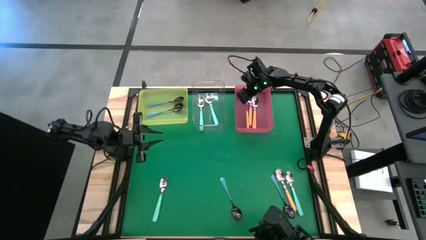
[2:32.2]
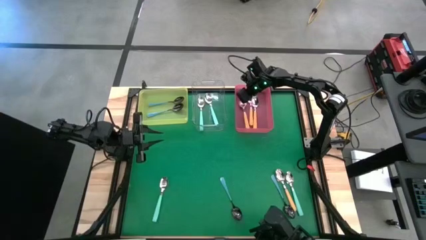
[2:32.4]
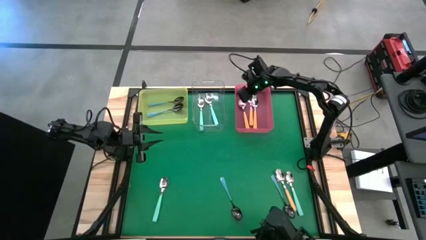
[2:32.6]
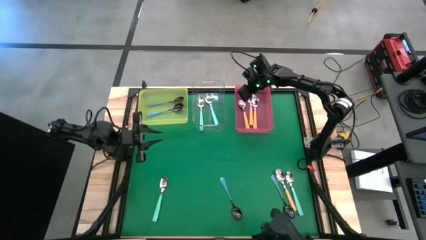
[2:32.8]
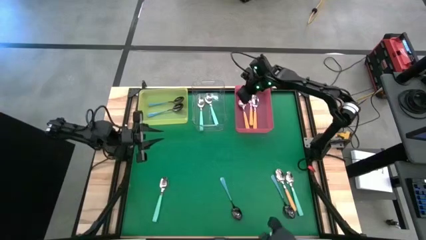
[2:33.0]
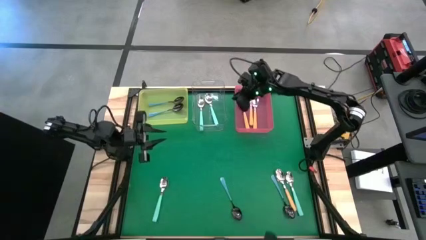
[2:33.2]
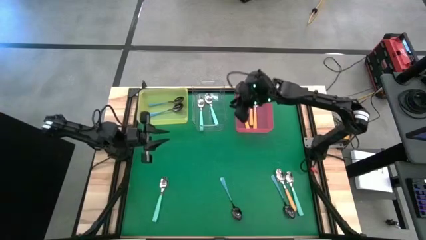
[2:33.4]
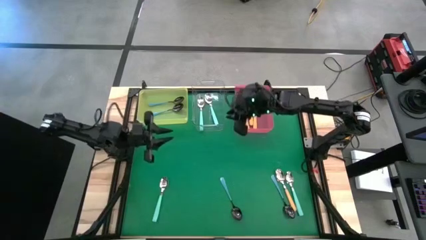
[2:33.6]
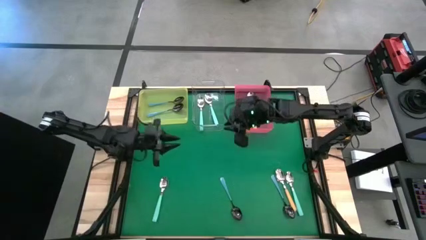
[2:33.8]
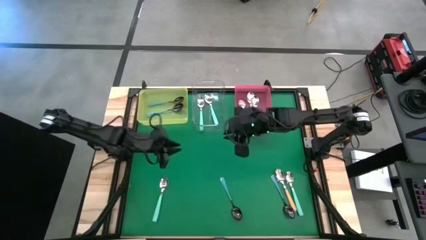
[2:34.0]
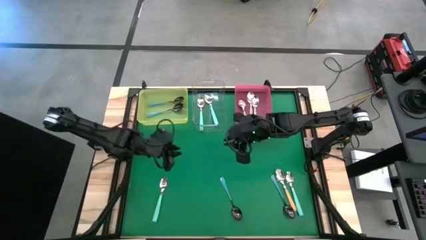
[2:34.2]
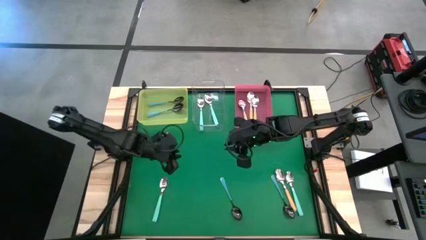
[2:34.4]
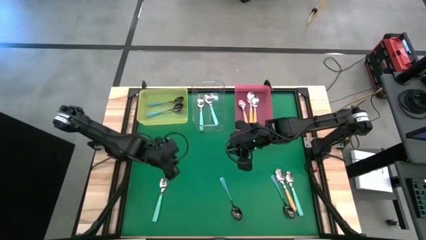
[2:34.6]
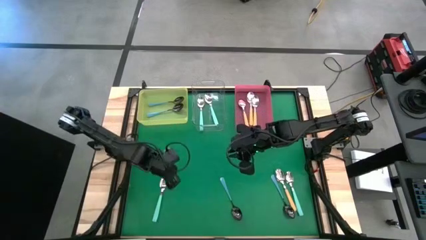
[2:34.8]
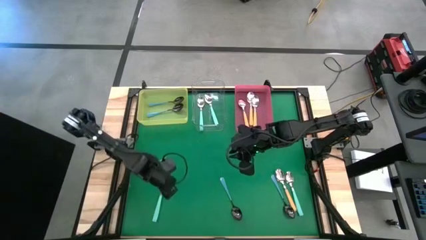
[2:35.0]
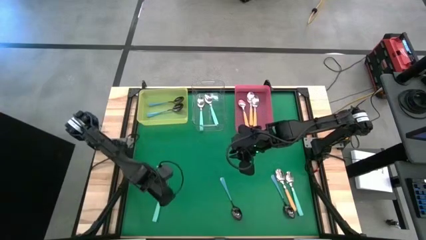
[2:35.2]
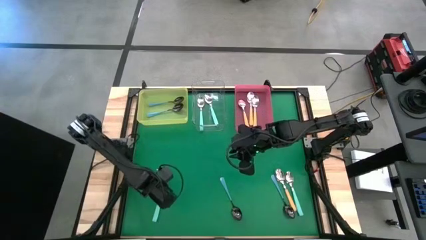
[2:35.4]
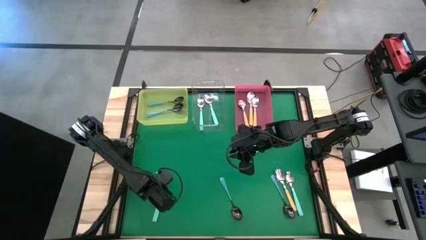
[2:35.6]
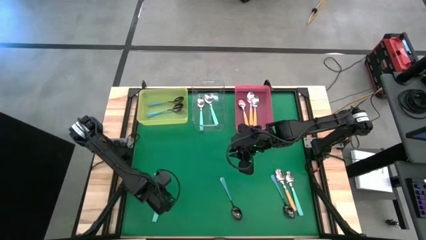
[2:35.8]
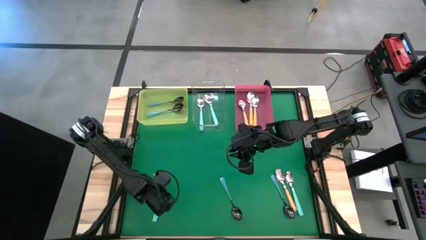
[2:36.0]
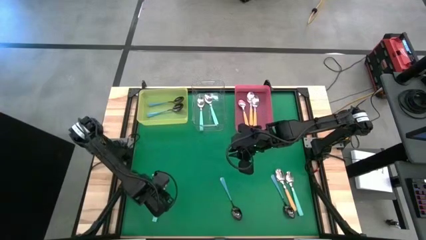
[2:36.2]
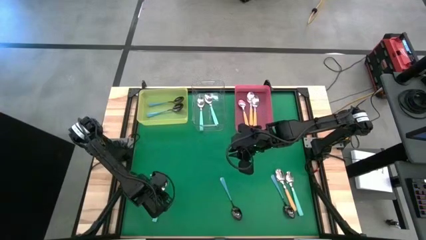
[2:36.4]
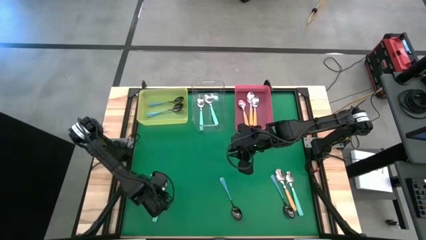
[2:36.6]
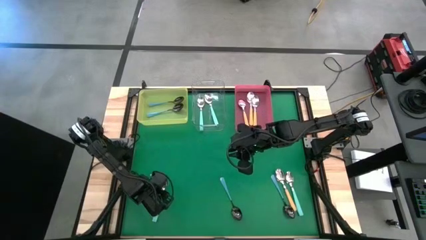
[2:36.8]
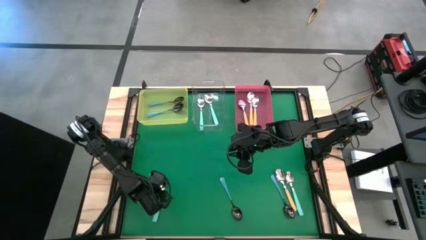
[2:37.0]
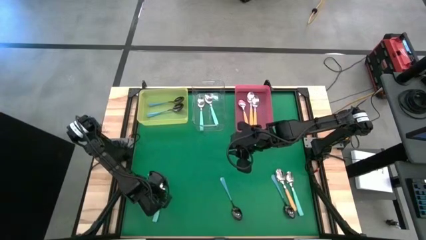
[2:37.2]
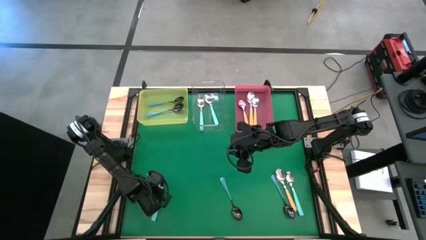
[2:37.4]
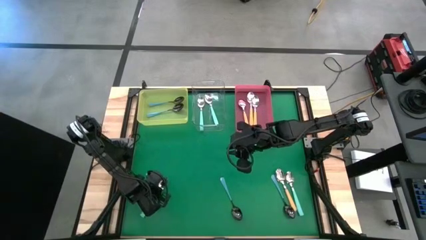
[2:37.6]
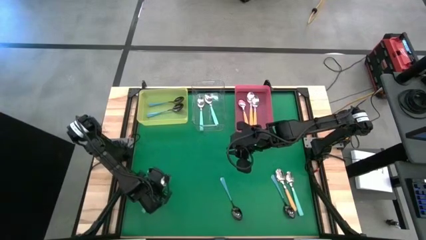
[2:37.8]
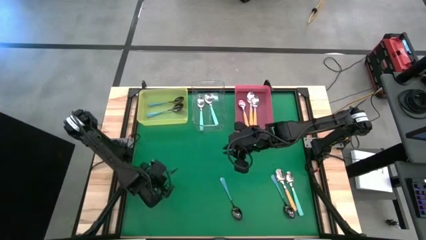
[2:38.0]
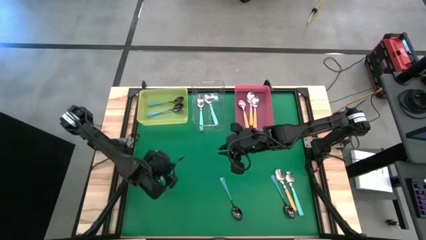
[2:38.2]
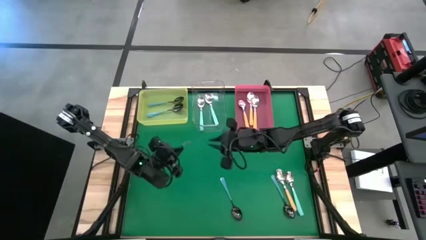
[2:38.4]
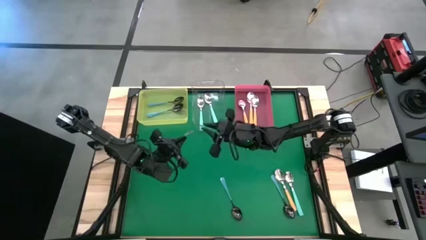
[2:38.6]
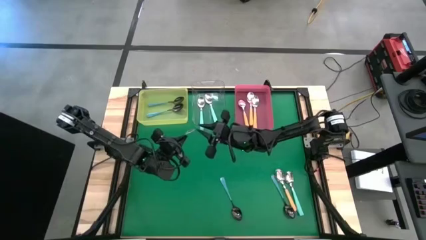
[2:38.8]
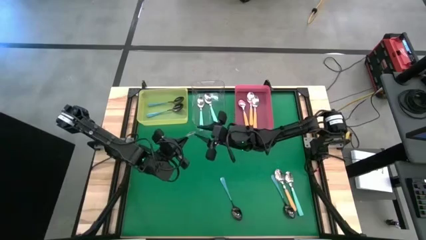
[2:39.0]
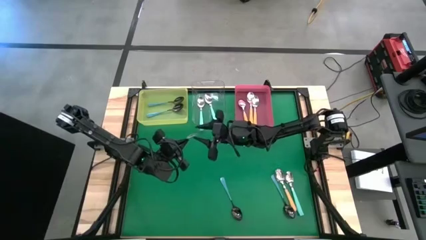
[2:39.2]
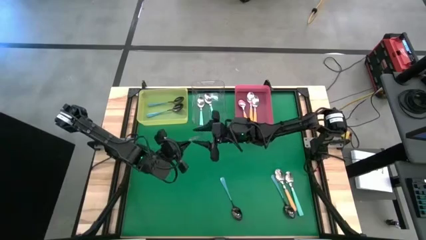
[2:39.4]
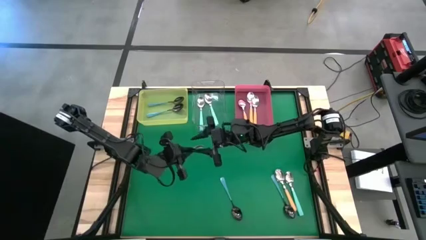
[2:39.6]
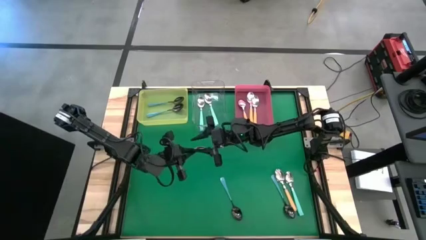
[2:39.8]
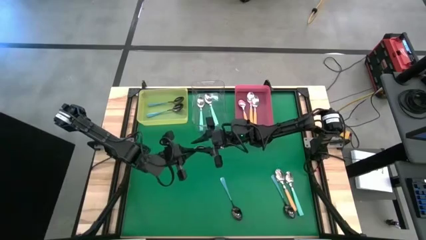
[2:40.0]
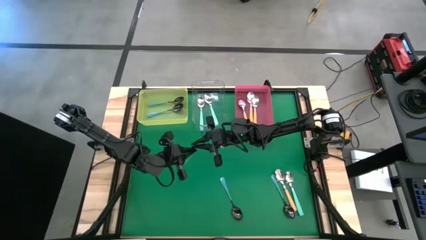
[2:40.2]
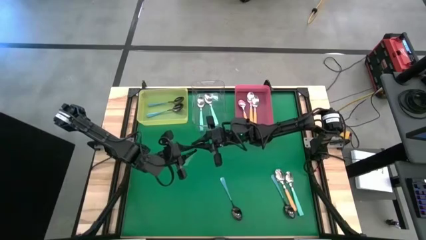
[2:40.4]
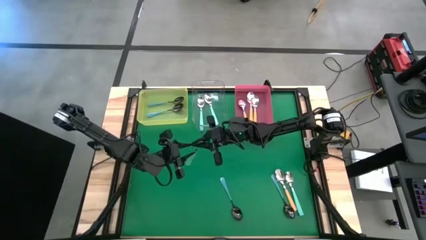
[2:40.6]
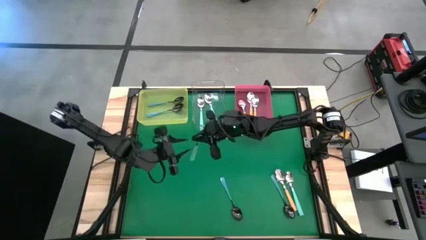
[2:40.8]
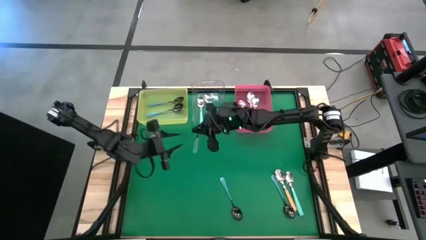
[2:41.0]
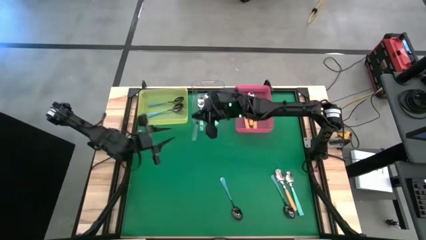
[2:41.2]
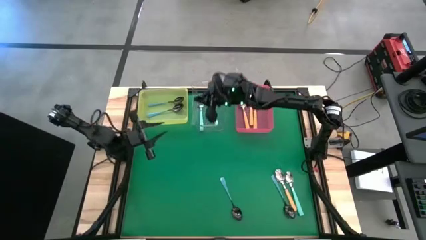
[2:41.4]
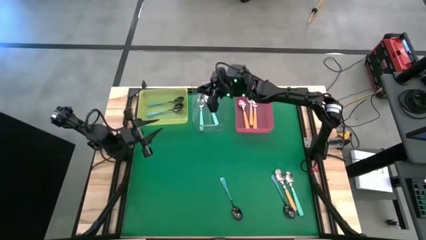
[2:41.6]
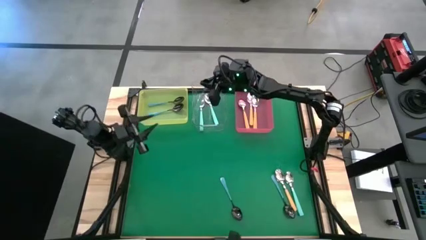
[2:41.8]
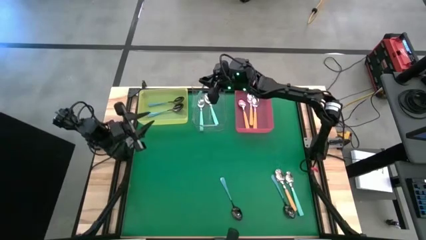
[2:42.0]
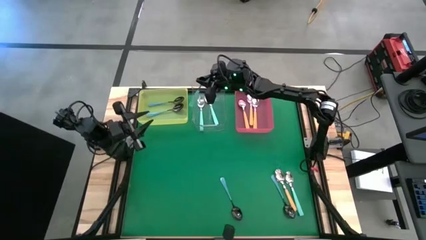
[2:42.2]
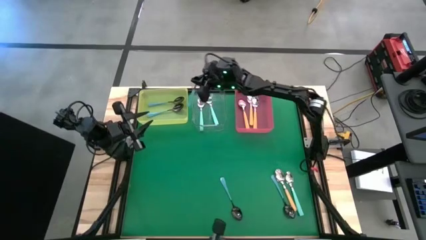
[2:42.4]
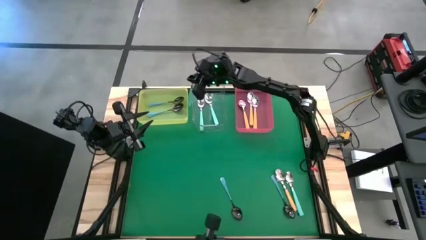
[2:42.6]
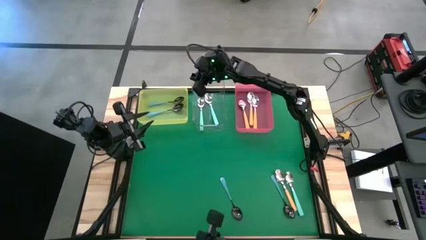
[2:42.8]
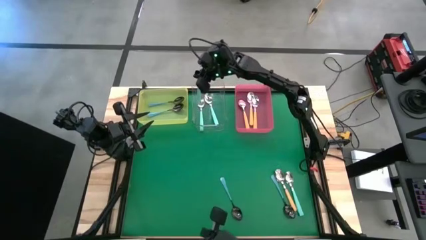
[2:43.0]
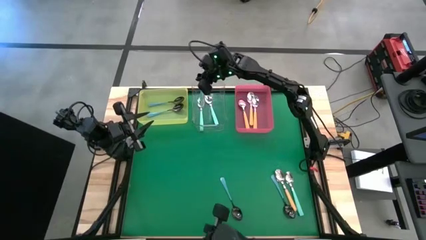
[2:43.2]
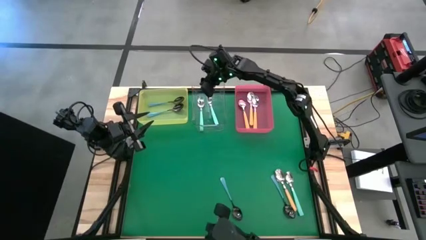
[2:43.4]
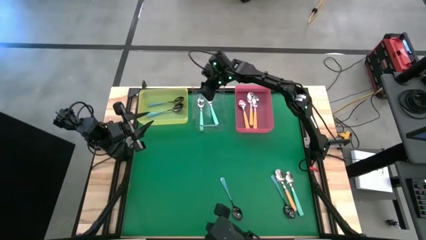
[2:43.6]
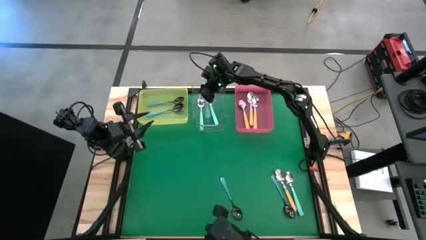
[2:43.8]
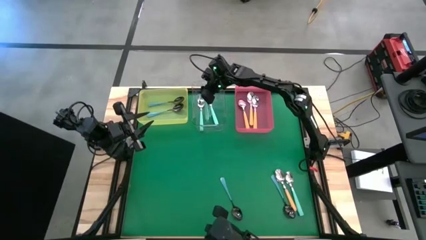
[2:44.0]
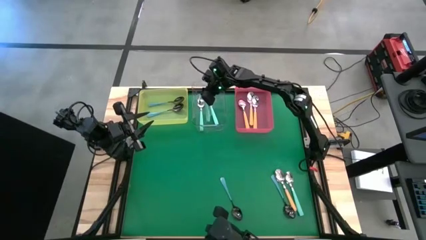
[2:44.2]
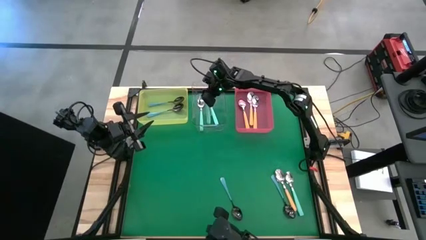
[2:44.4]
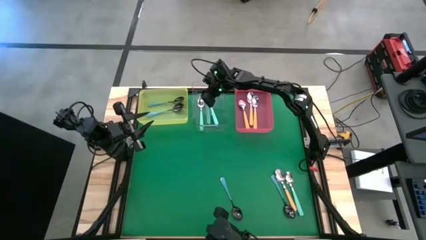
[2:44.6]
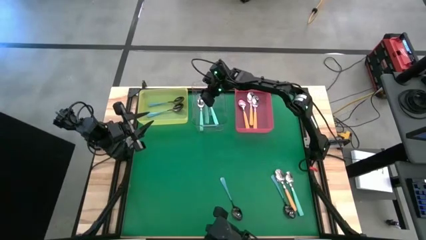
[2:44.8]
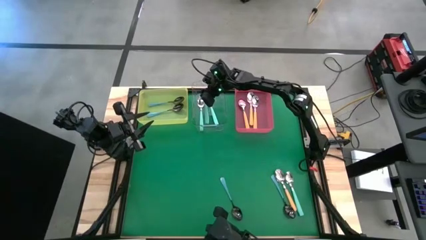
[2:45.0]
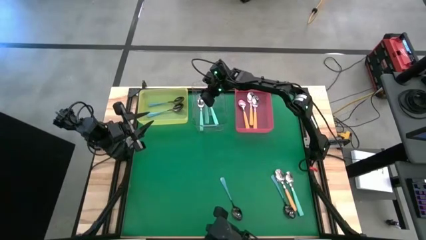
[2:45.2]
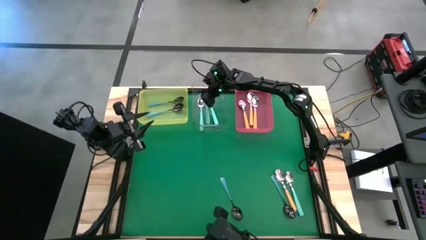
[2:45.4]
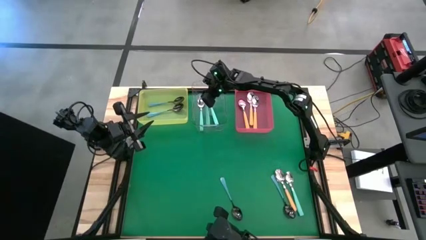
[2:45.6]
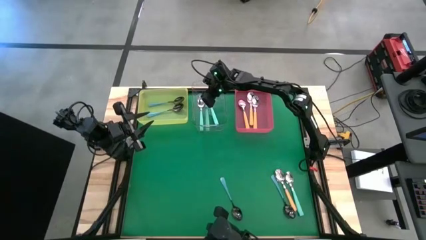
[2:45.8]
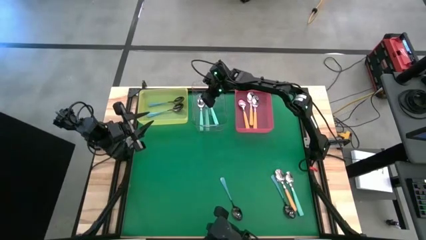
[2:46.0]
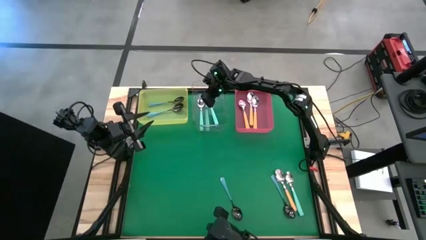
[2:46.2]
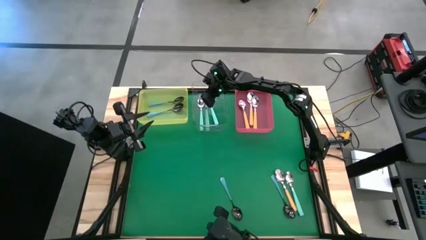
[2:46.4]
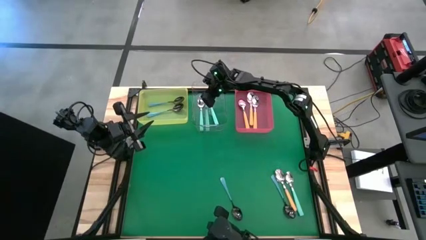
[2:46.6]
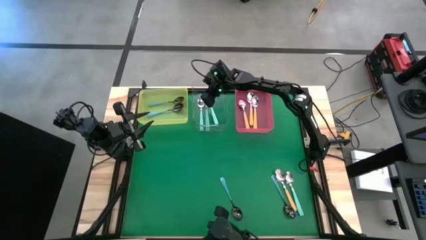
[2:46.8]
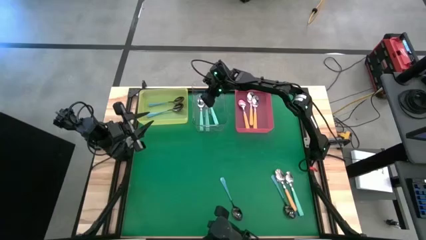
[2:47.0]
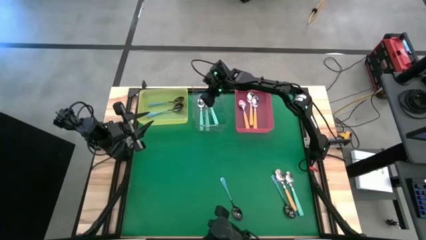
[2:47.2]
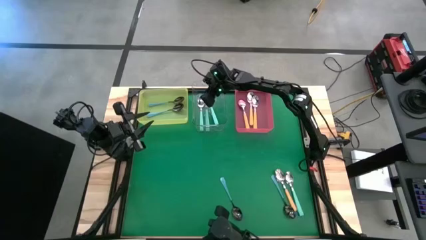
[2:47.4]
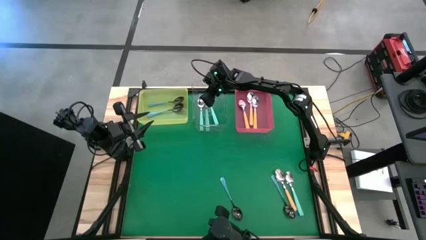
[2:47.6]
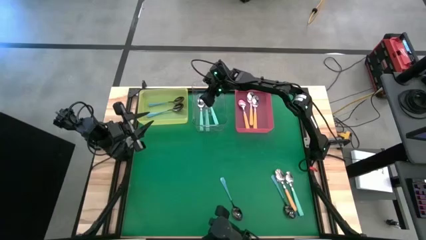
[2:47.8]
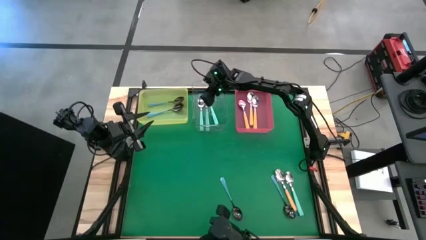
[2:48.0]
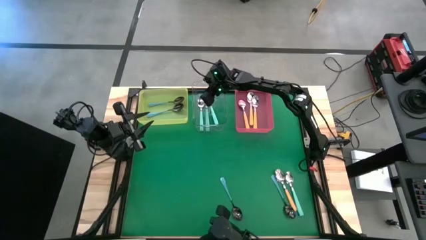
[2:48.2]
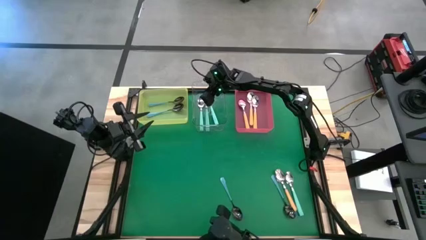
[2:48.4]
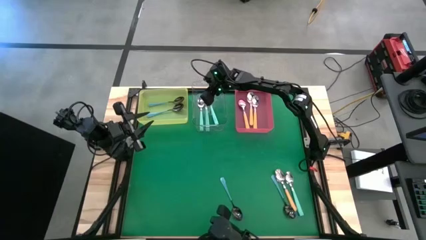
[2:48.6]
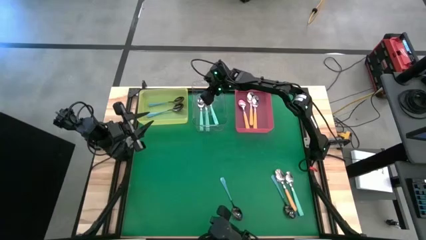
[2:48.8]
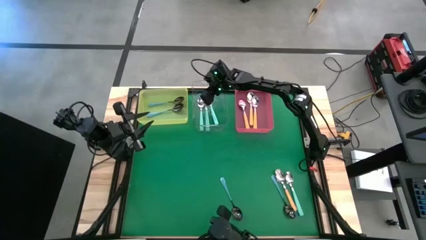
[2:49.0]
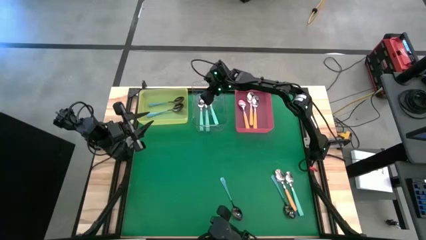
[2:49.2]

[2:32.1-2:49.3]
Task: Sort silverware by color (type)
Put the green spoon into the transparent bin
